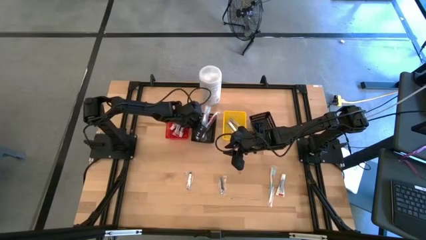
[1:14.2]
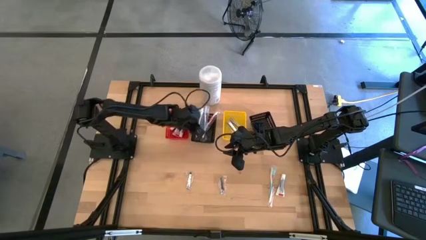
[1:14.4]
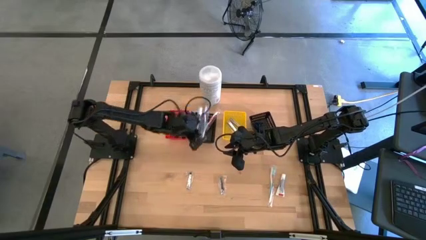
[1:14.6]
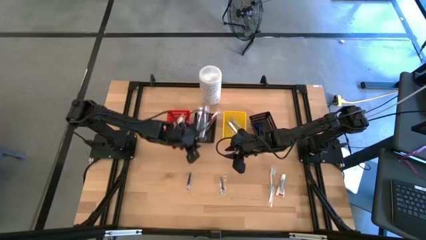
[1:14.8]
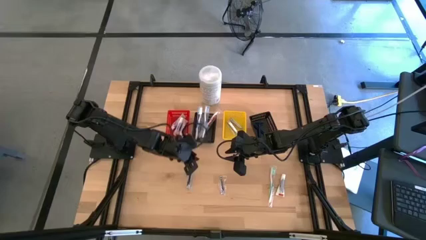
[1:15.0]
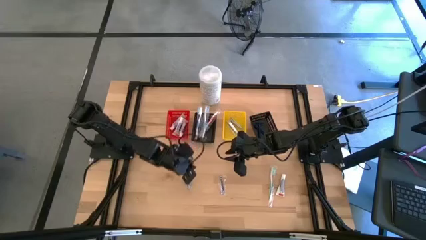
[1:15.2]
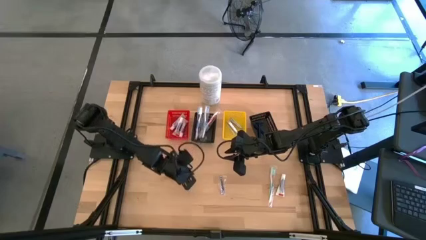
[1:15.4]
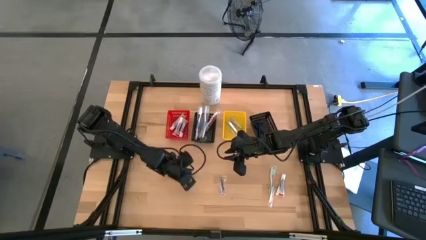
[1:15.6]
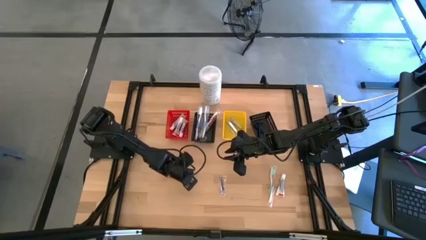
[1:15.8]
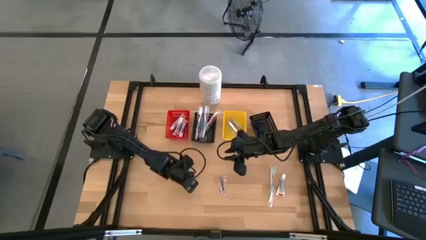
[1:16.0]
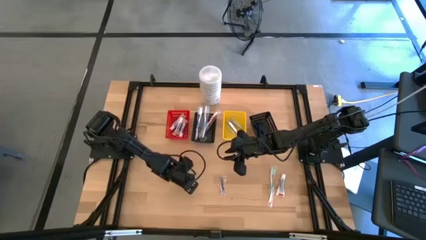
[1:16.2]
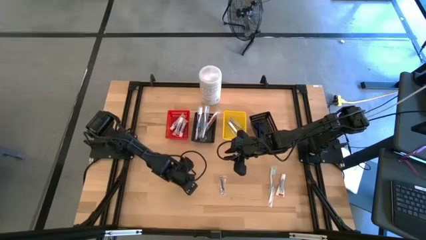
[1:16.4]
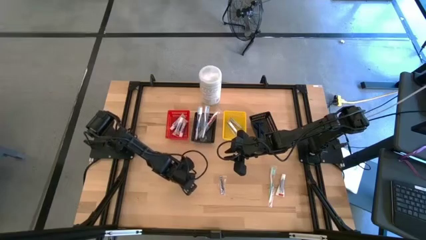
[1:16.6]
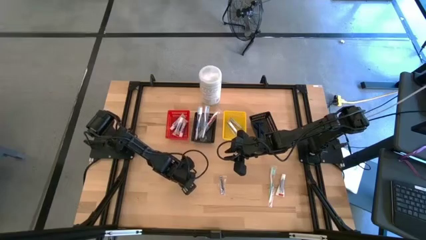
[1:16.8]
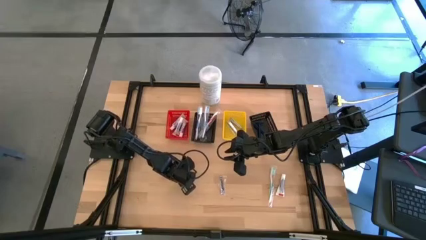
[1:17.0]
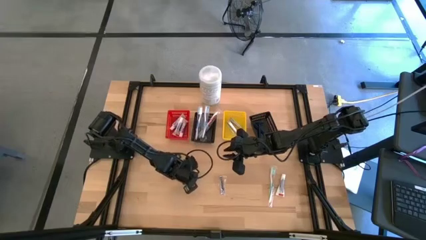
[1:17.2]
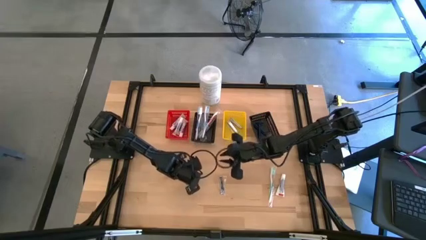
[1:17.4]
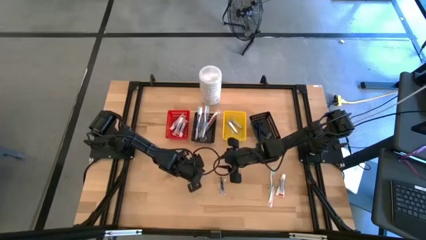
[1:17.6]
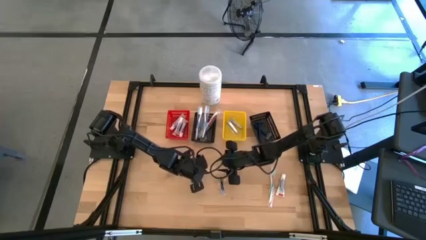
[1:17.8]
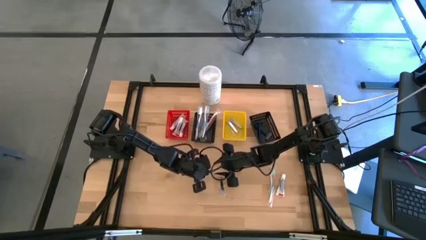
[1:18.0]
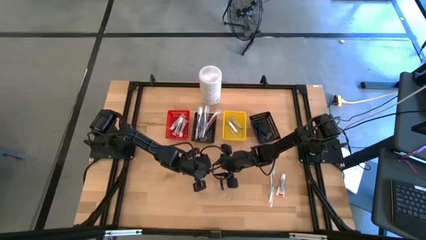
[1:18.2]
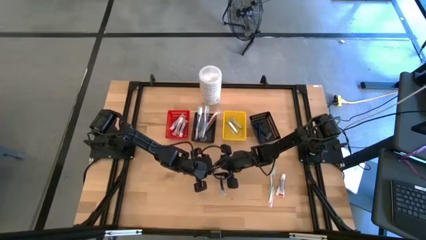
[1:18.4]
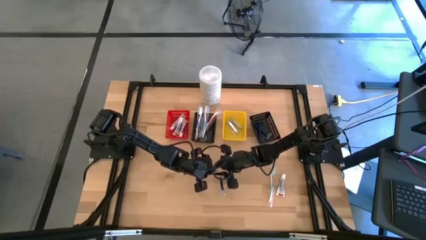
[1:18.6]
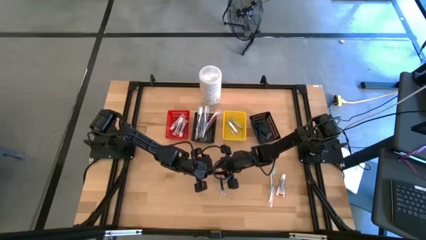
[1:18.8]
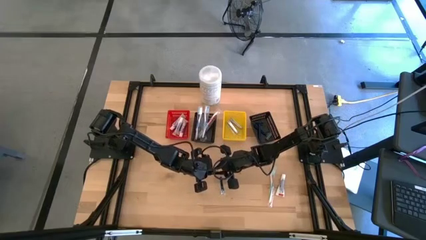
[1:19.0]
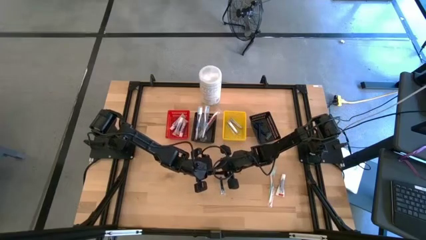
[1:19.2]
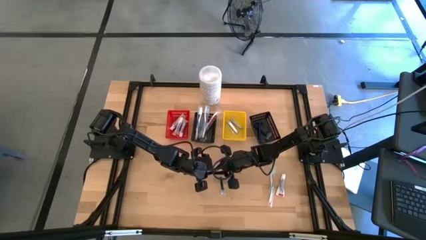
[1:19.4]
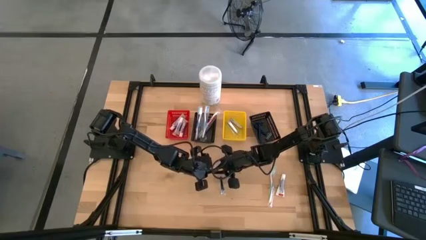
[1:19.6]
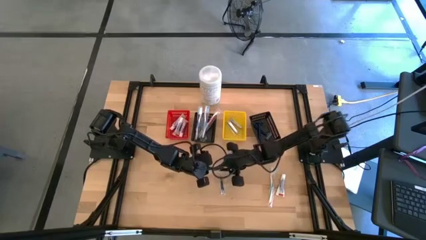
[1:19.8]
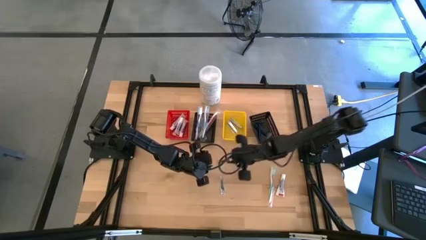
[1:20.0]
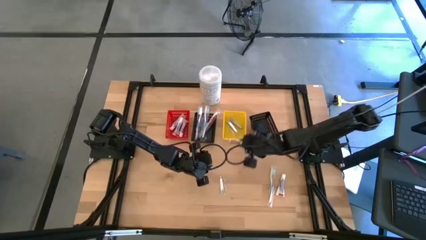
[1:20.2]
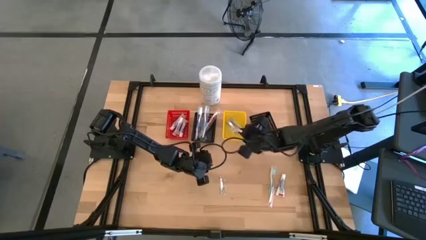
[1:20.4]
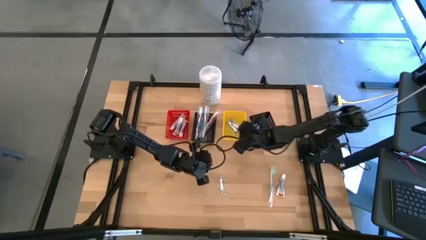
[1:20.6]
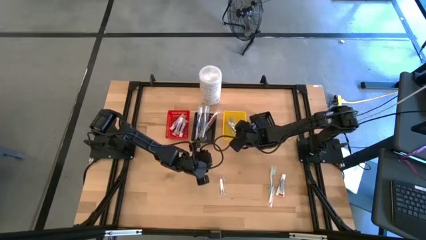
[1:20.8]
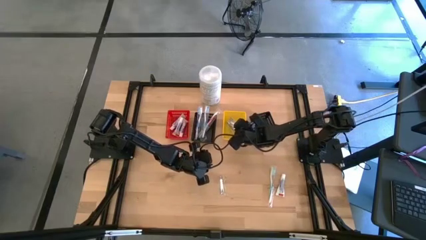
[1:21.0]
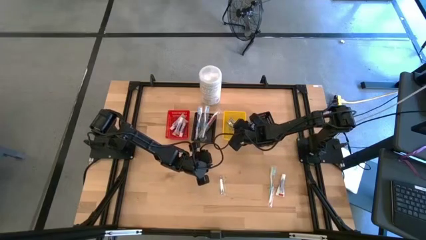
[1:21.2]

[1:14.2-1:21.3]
Task: Pick & Place Travel size toiletries
Put the nail cutter into the yellow basket

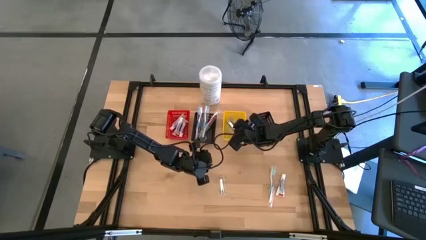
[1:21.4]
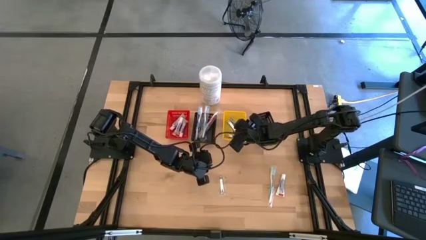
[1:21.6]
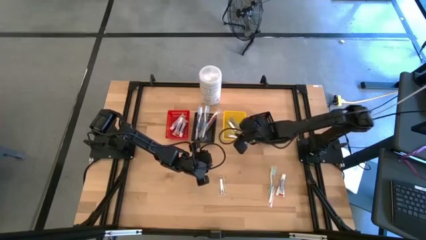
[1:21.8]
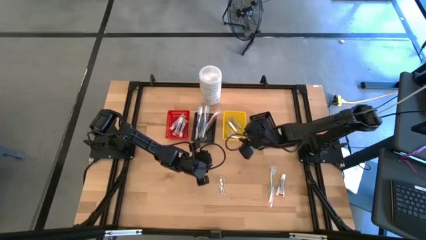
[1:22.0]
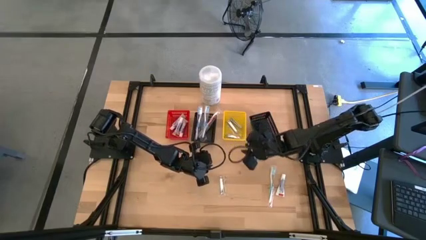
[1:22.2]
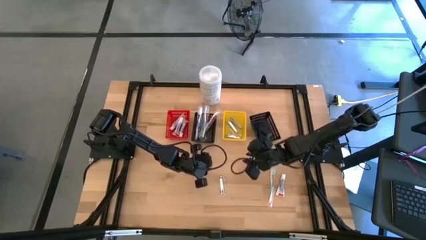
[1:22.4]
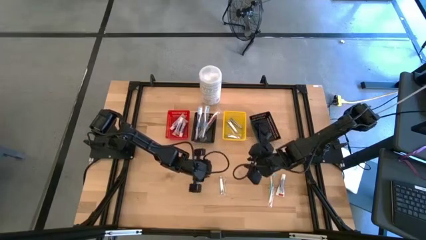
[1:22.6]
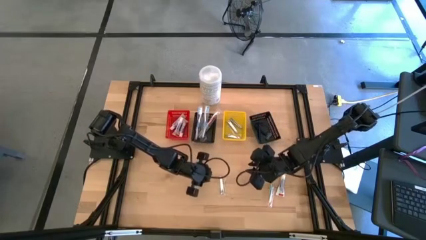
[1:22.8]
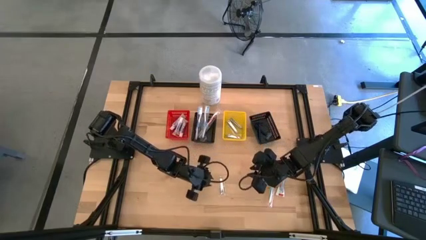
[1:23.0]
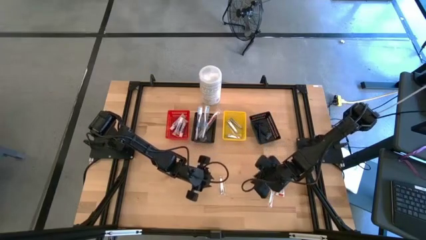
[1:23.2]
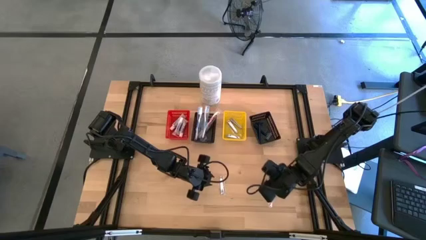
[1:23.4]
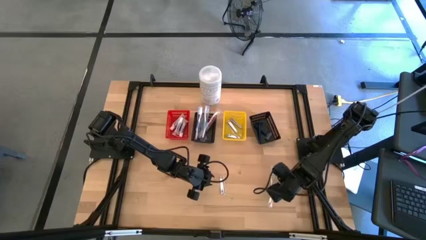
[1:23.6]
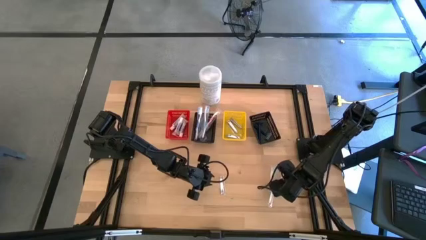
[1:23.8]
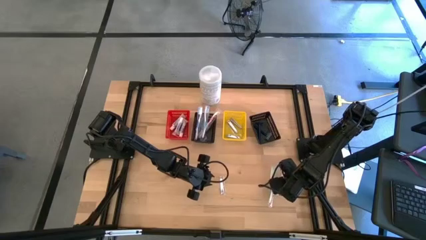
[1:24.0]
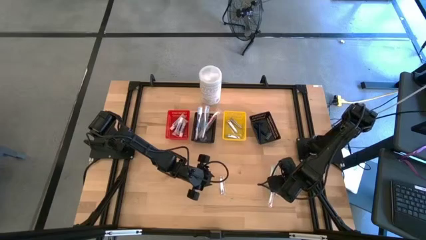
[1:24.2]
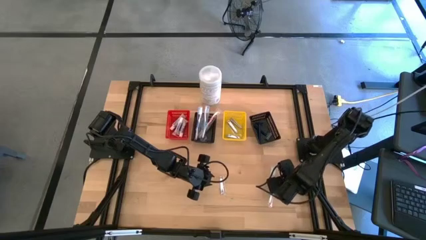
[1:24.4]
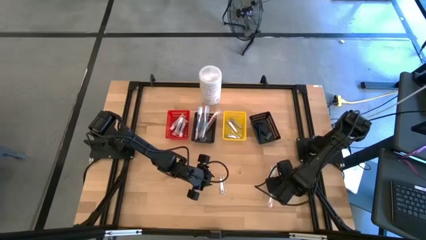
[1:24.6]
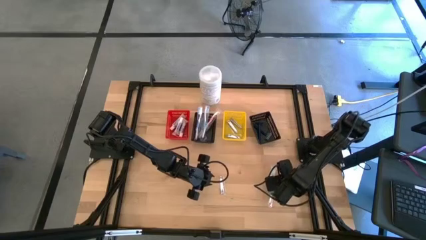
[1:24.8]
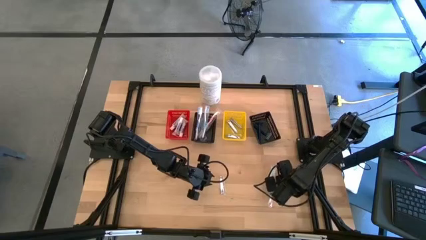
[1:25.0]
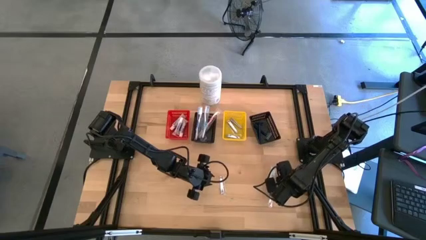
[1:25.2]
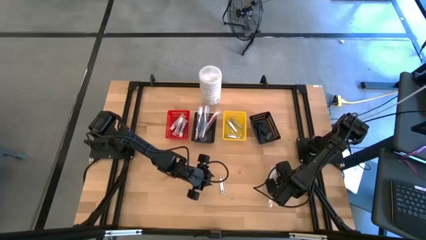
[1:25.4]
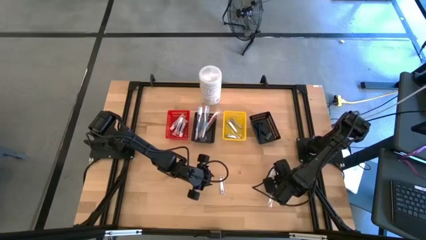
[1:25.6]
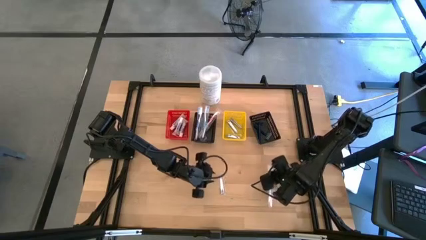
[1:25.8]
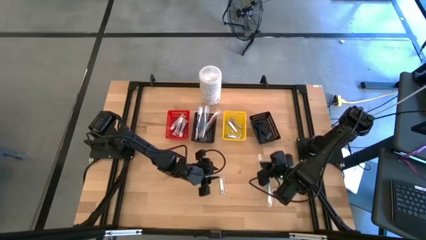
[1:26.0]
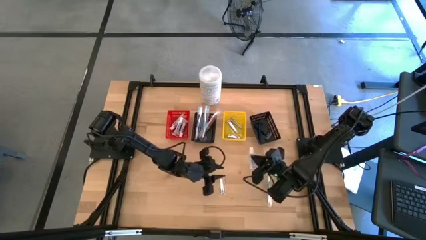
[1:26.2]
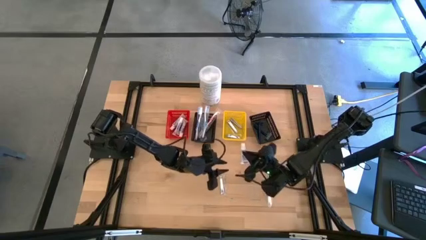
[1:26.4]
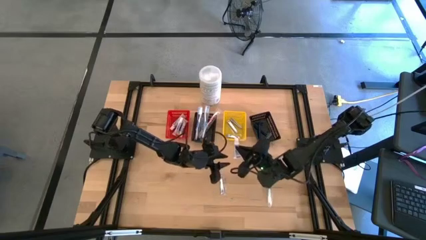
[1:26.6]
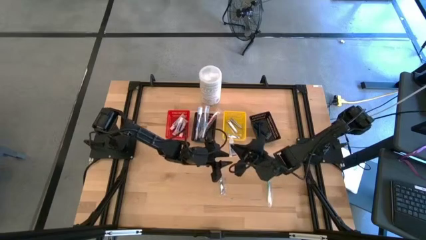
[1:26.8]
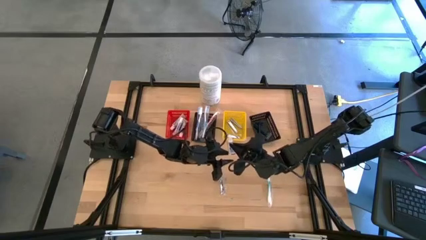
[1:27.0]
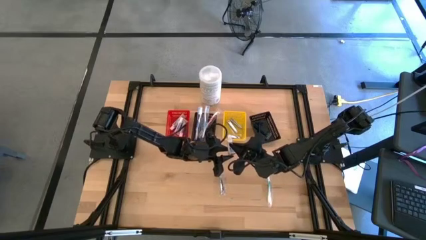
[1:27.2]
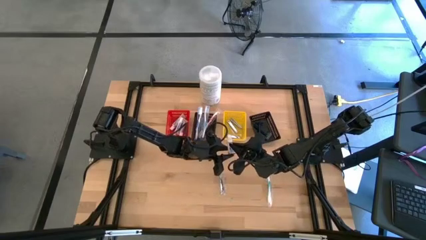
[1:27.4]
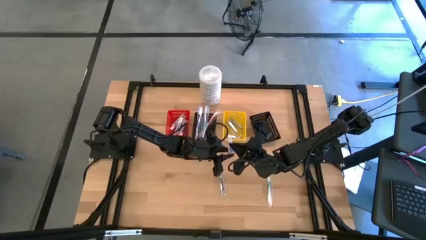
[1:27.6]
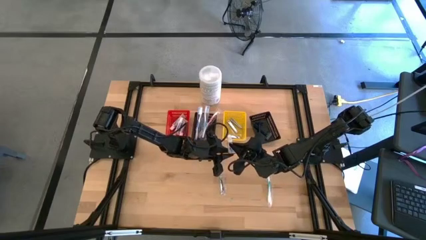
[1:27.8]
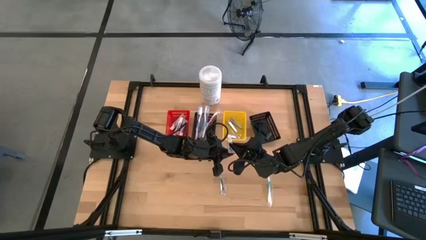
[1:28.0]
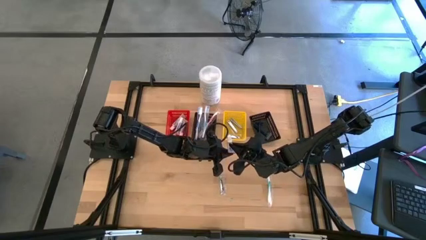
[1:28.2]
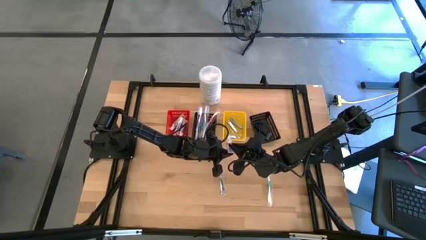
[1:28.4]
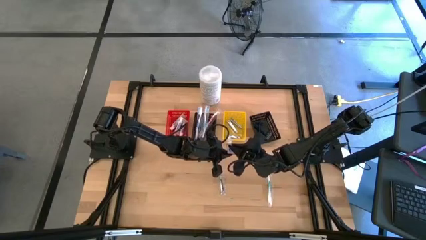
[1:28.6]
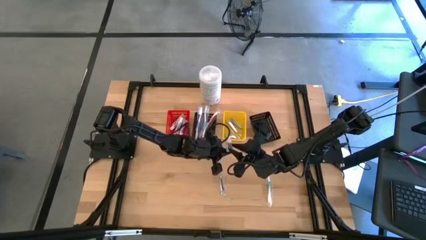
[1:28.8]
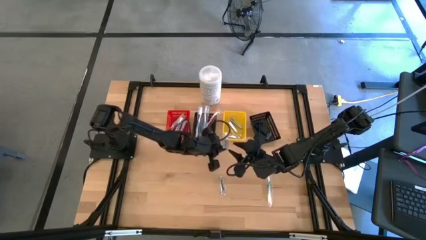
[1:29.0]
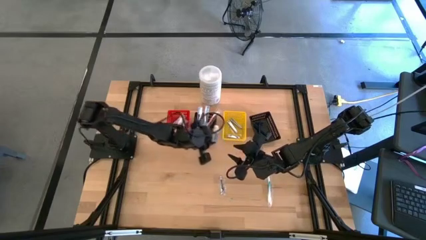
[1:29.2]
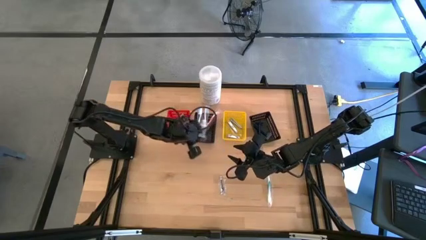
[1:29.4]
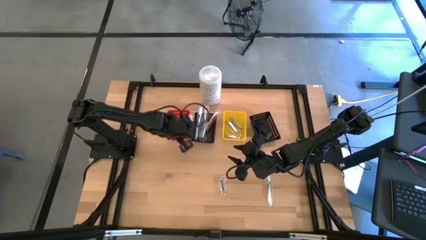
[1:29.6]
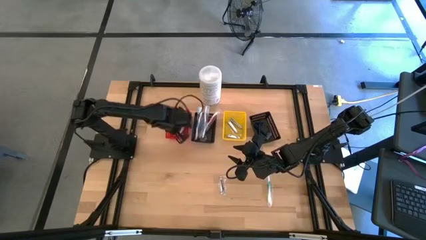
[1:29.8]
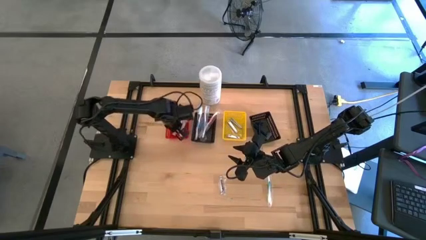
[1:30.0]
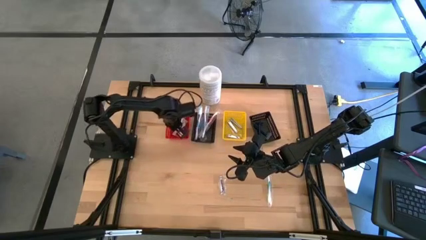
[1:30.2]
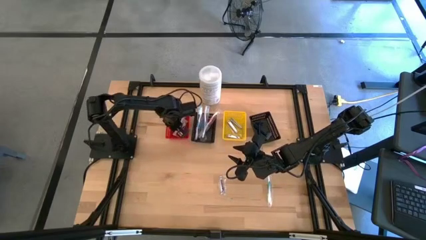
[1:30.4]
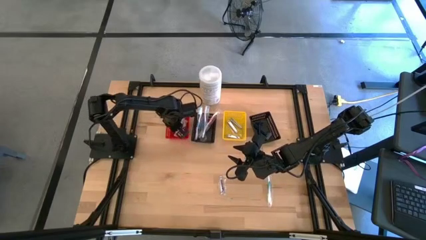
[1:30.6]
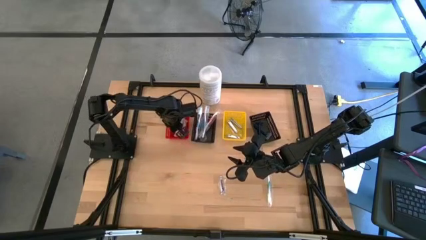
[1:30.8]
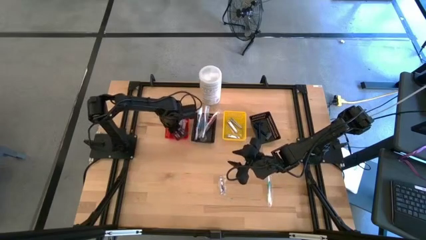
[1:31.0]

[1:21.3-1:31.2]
Put the toothpaste into the red basket

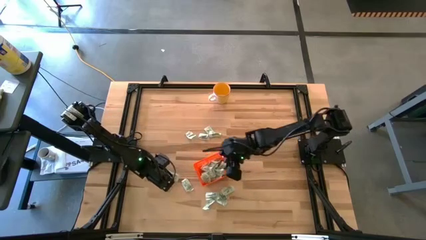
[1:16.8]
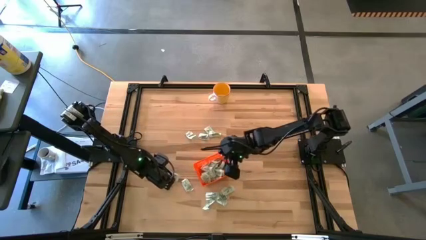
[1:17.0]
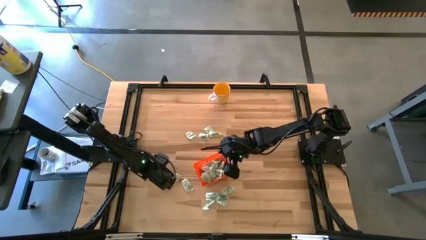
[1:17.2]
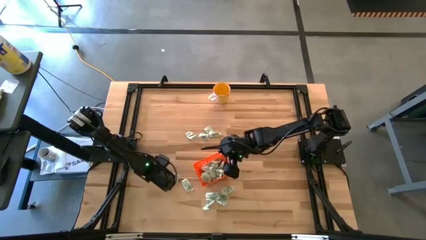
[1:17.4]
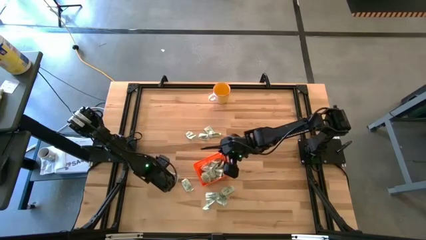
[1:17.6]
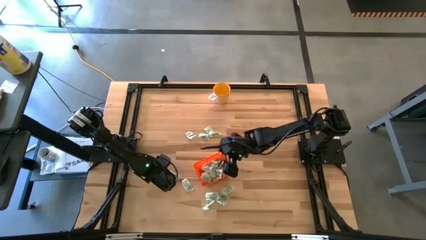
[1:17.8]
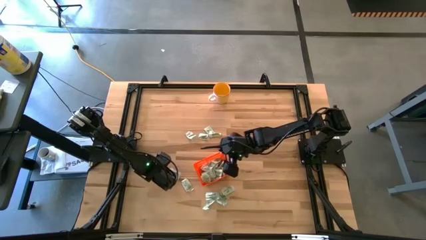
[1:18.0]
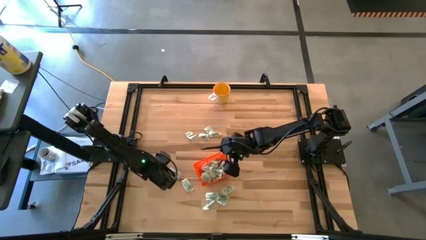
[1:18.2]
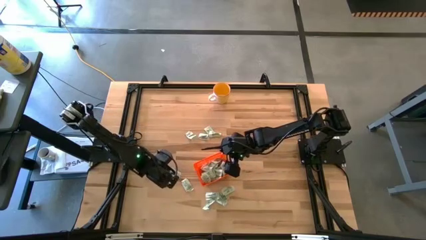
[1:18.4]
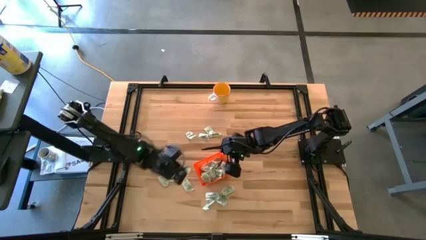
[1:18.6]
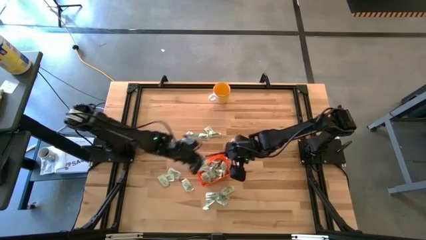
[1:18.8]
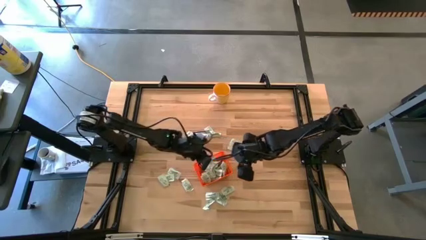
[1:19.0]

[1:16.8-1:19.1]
Task: Pick and place Stevia / Truvia into bins
Put the stevia packet into the bin
